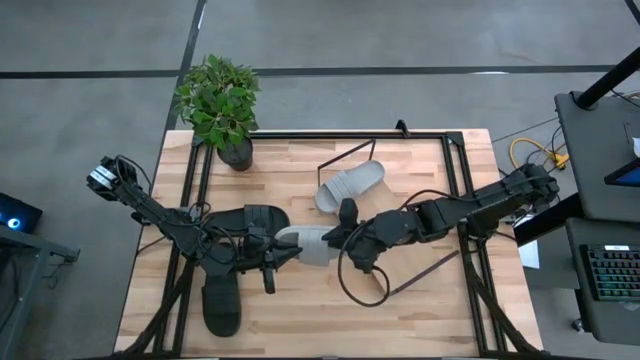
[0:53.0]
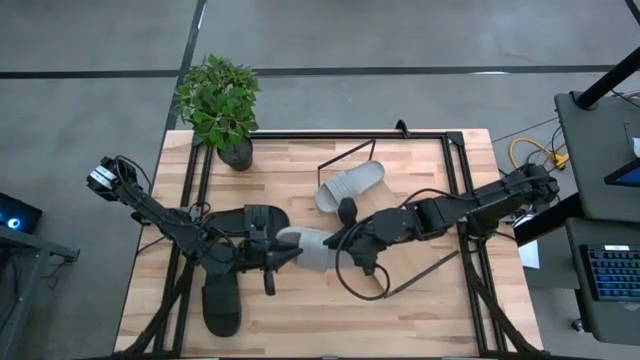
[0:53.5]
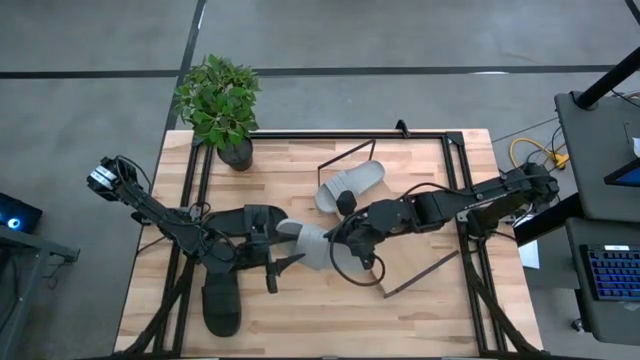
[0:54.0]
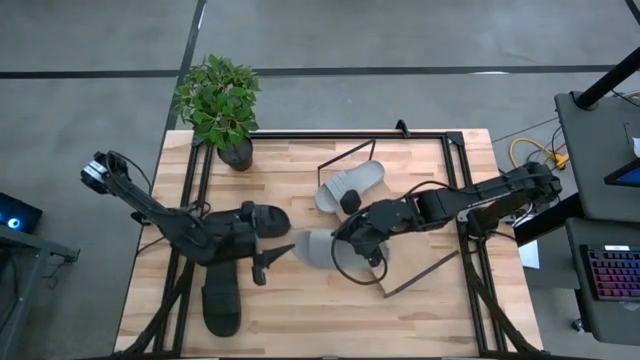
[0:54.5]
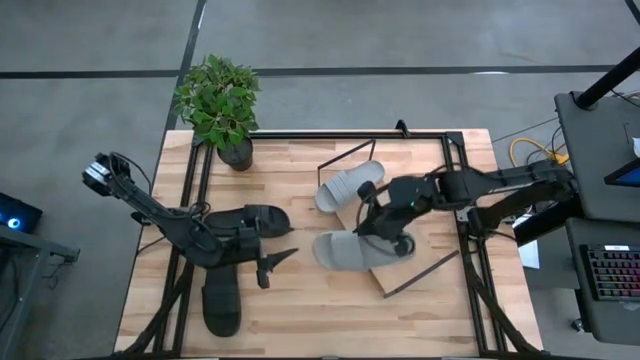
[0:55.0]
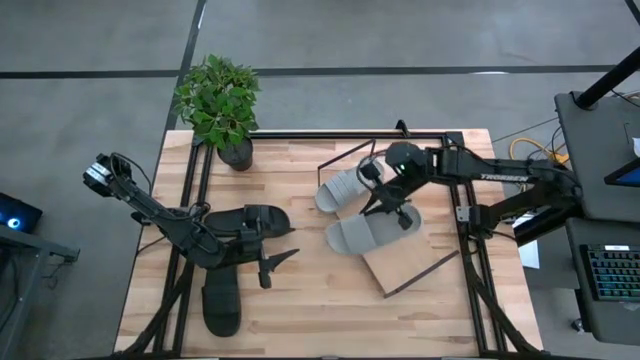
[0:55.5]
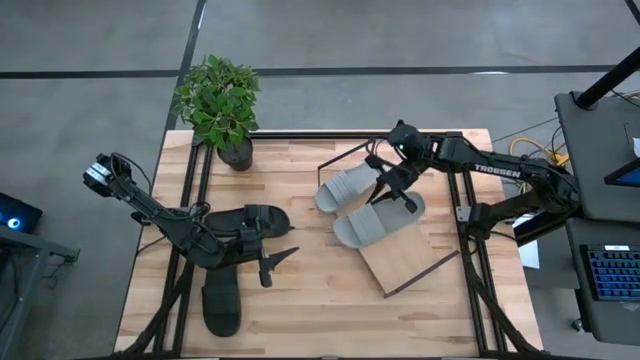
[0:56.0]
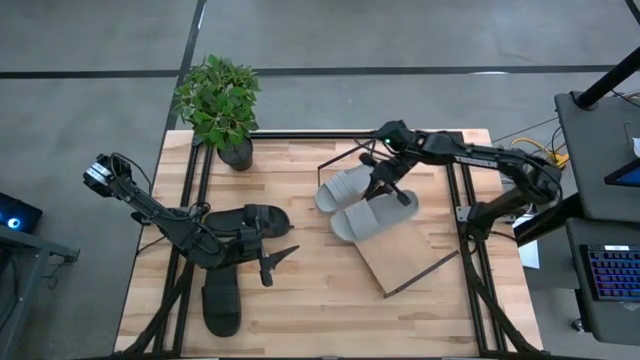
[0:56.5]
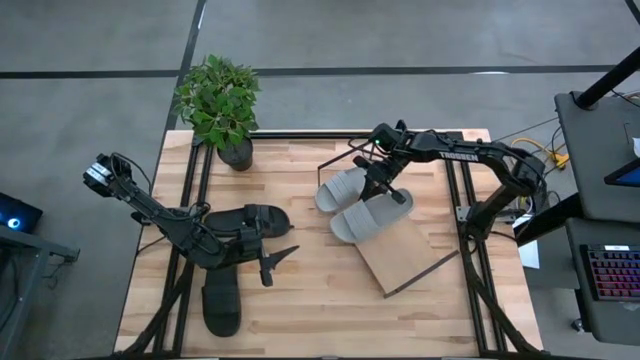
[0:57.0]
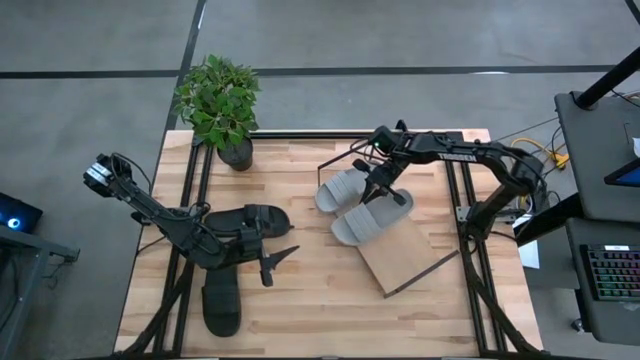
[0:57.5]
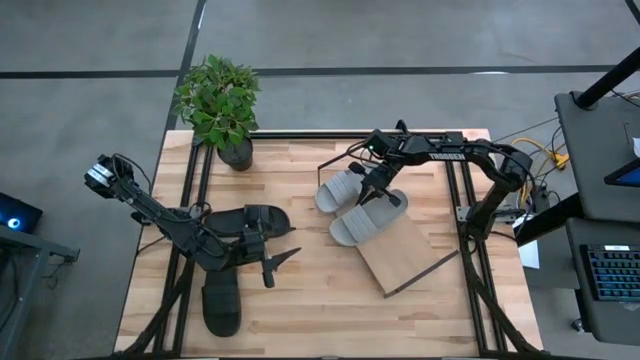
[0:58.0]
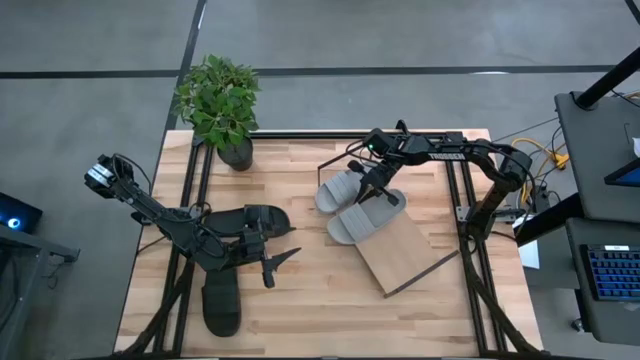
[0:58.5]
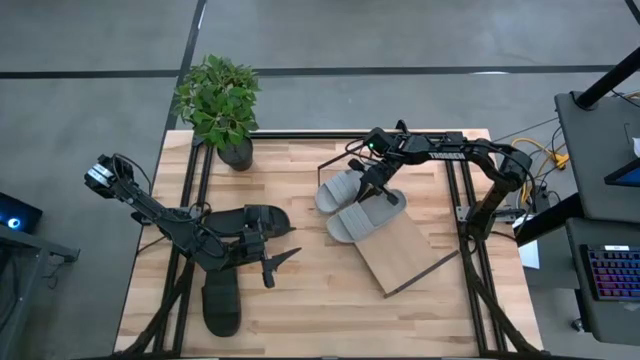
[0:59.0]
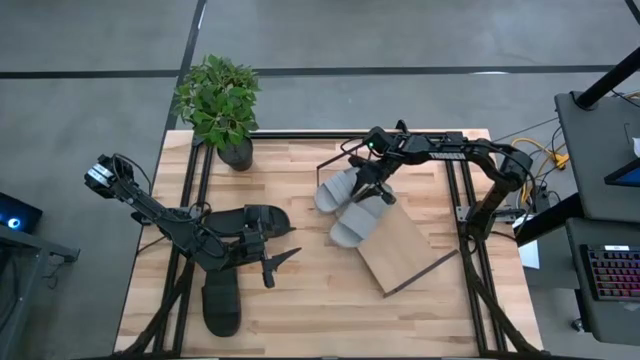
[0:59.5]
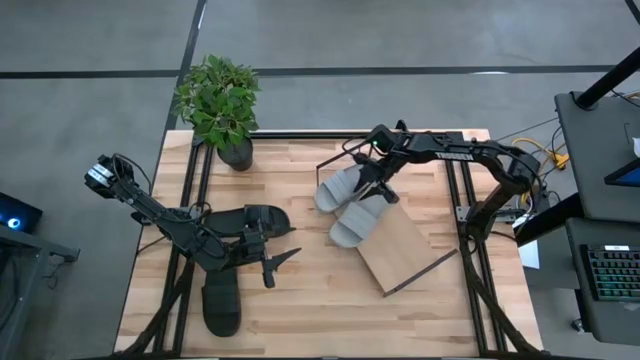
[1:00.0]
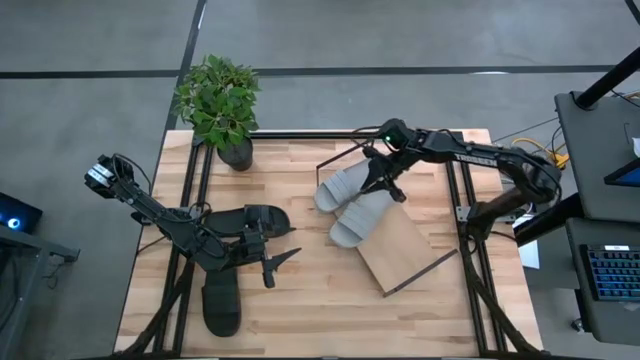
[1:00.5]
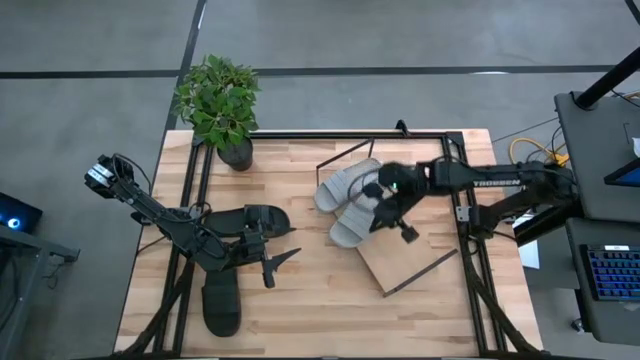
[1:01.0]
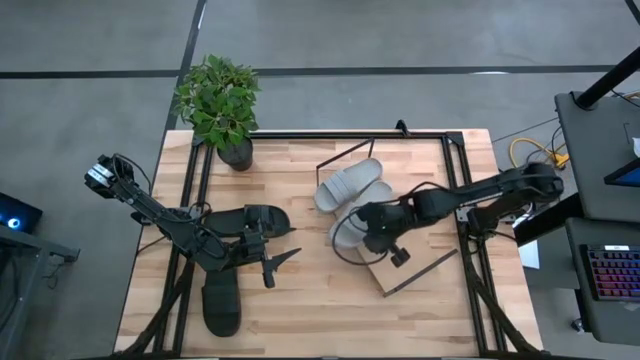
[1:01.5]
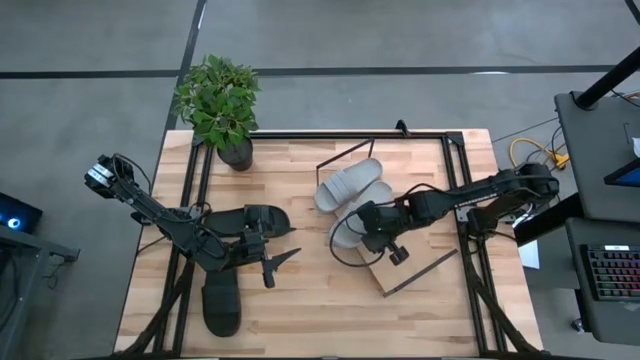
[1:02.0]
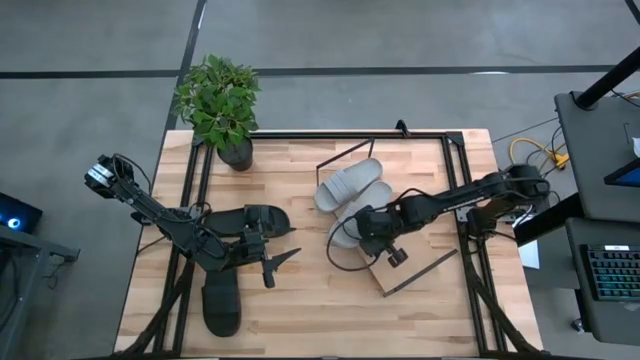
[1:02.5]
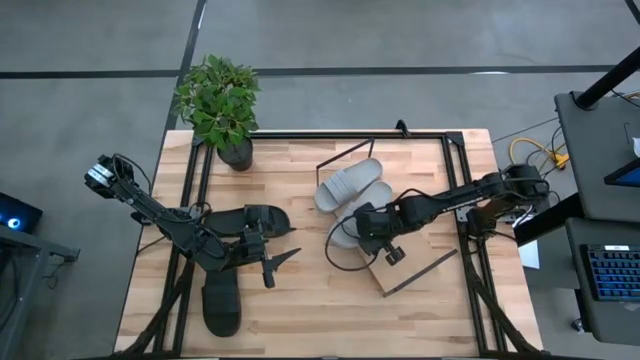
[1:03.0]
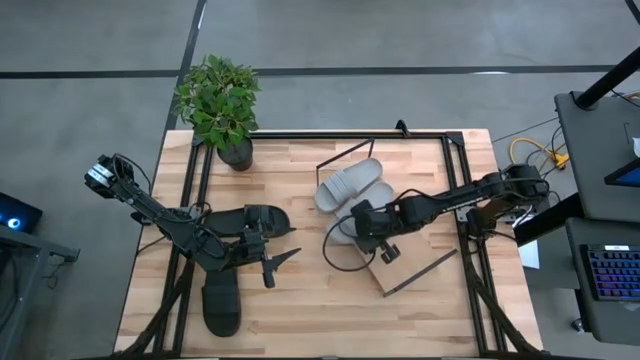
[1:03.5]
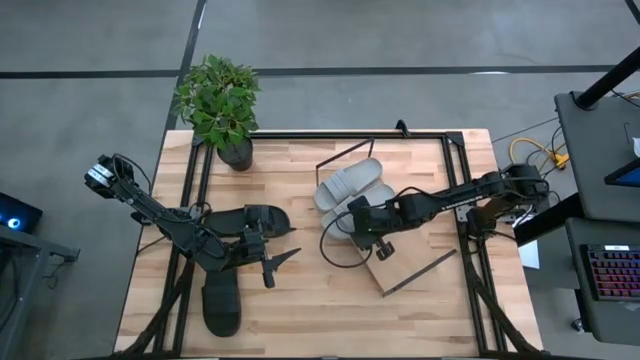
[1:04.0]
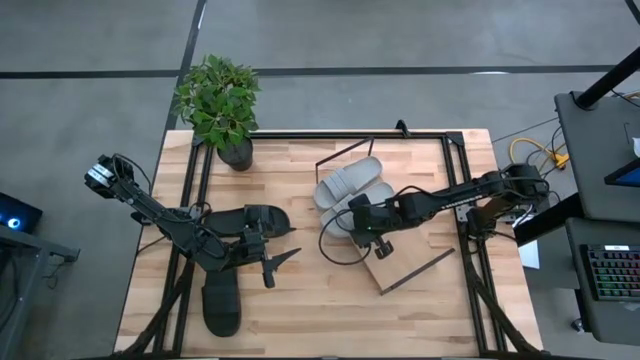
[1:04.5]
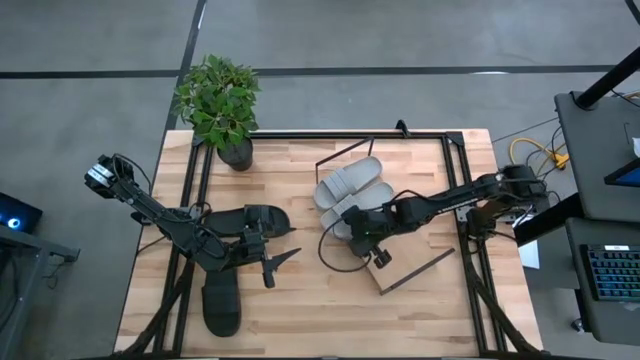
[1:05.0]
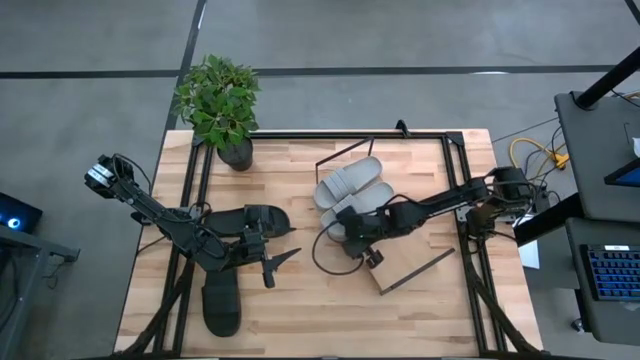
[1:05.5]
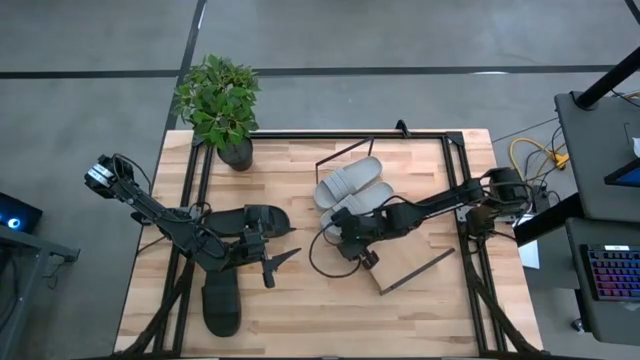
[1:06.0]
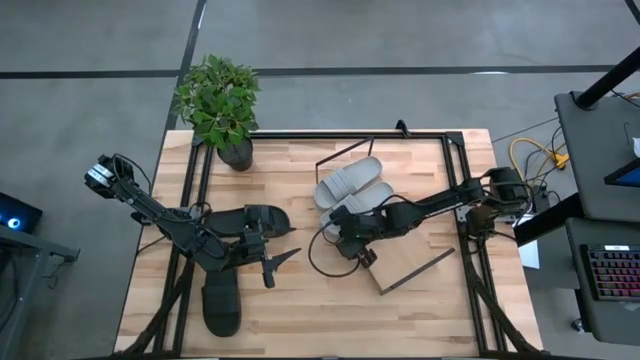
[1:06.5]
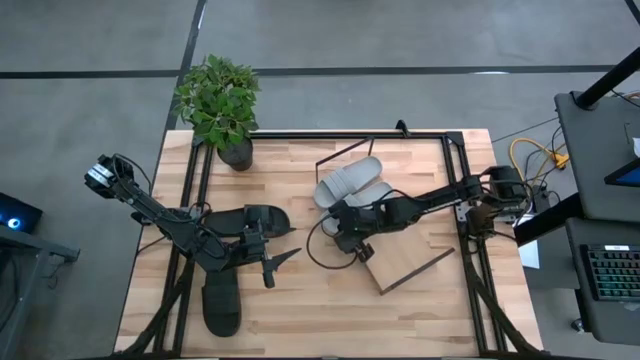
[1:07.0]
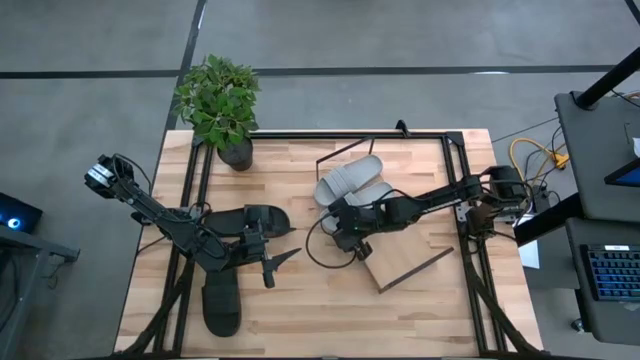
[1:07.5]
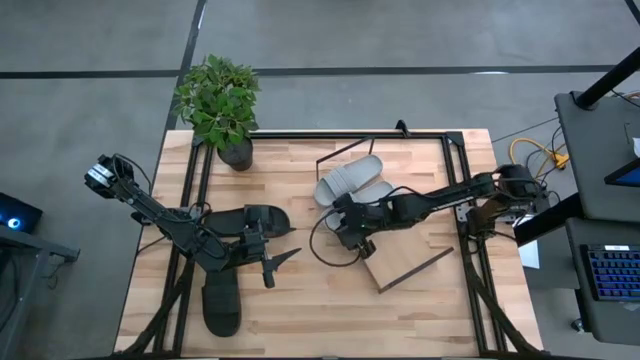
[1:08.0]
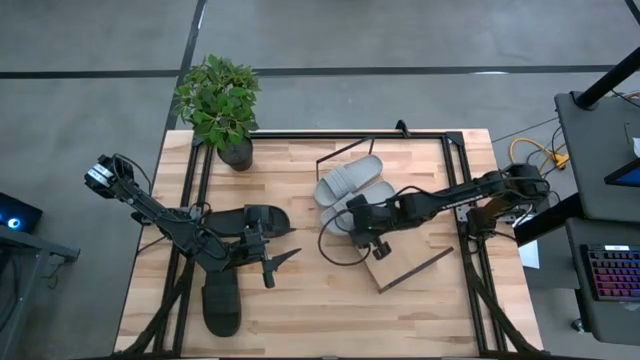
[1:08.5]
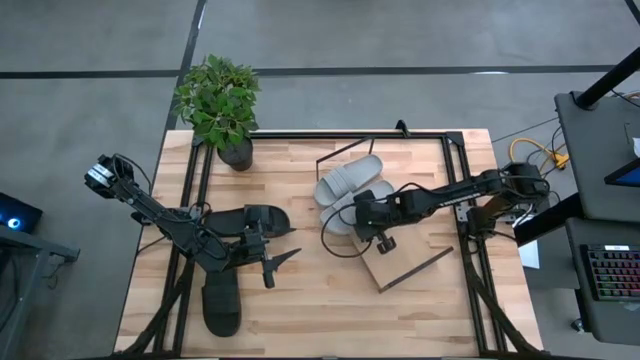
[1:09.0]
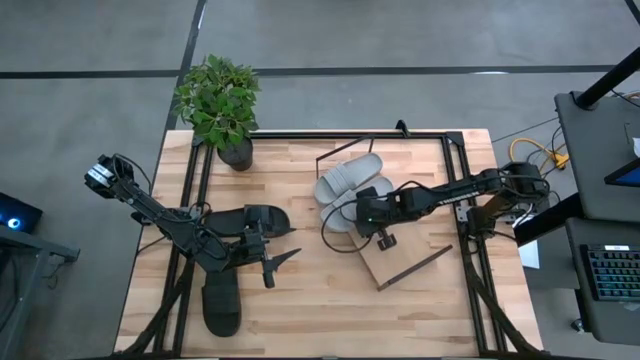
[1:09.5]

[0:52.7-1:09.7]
Task: Pick and place slides into the shelf
Put the gray slide on the shelf

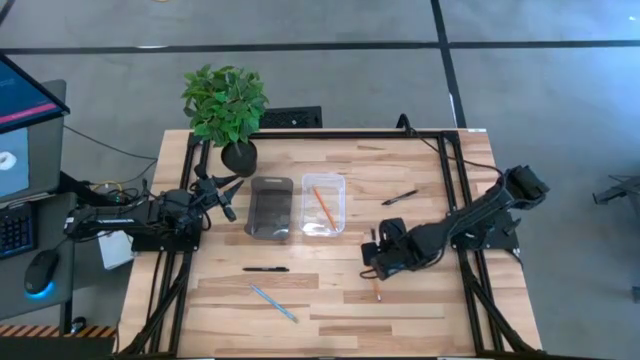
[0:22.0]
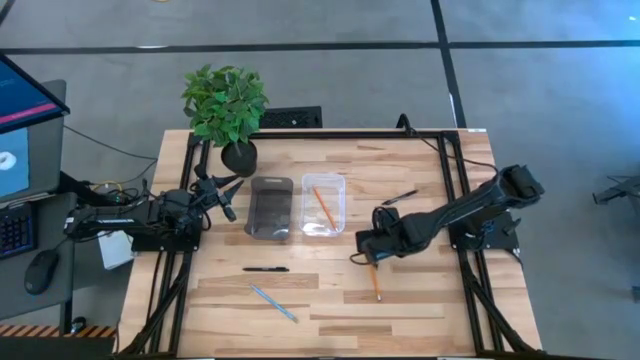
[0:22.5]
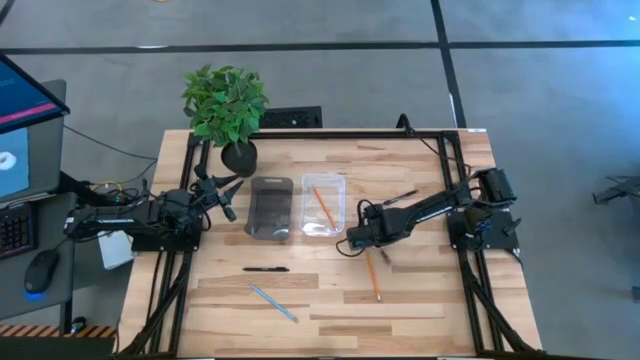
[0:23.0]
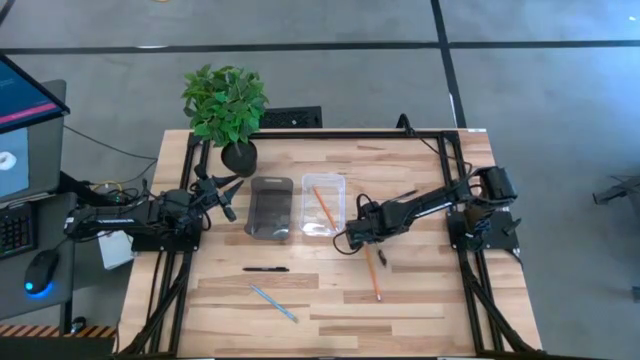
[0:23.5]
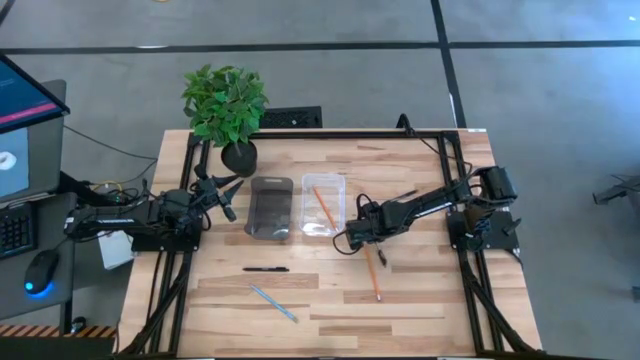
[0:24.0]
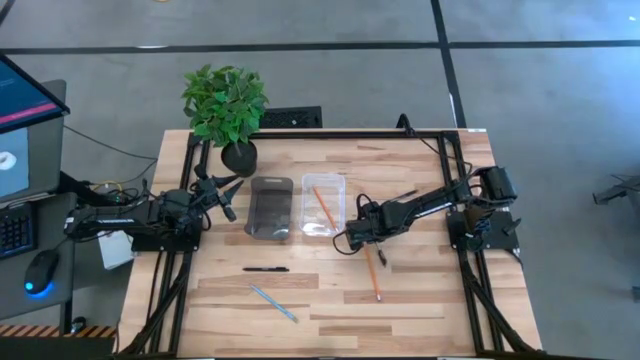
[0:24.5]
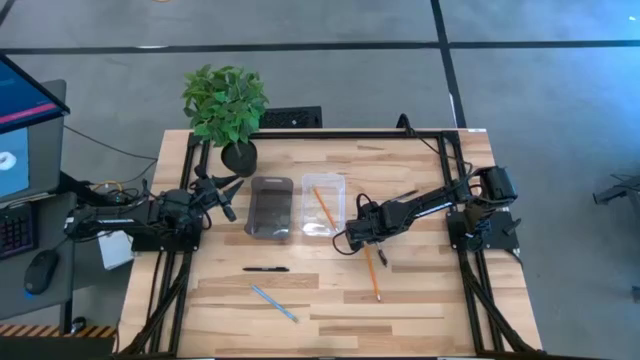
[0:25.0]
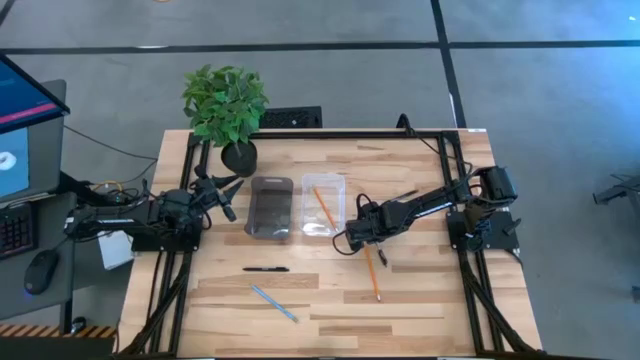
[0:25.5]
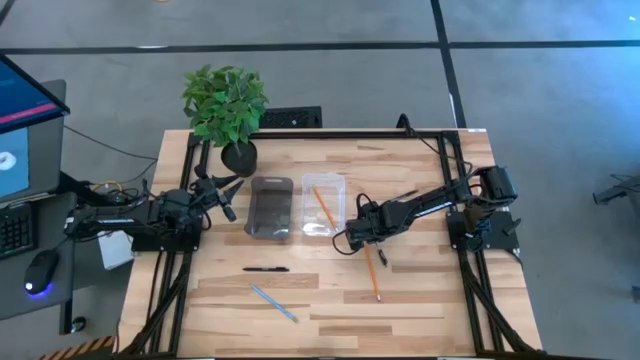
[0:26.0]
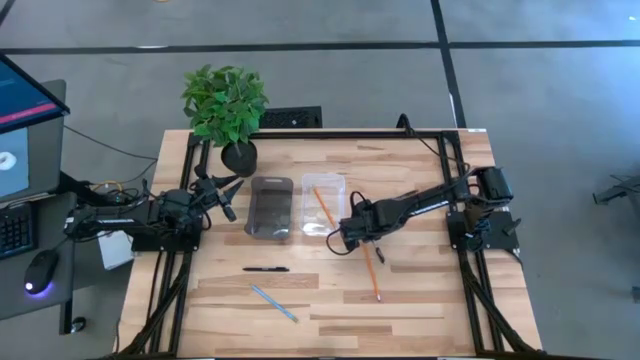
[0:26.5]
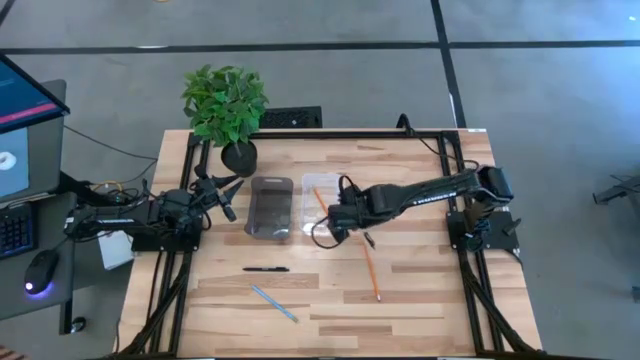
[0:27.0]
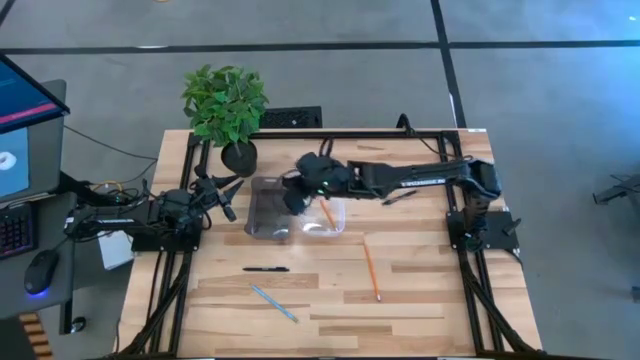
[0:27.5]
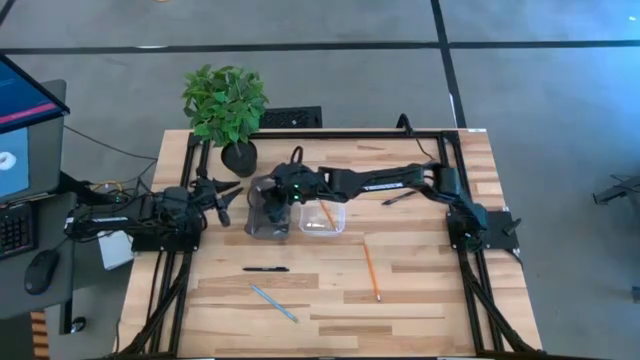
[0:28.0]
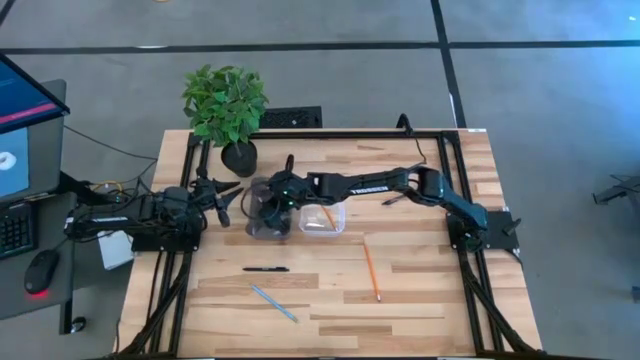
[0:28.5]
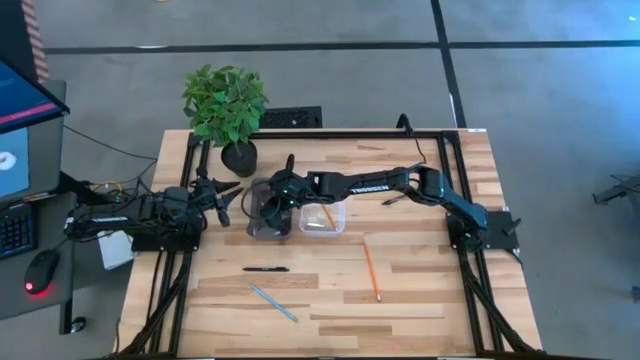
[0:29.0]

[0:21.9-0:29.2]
Task: Sort pens & pencils
Put the bottom right black pen into the black bin
